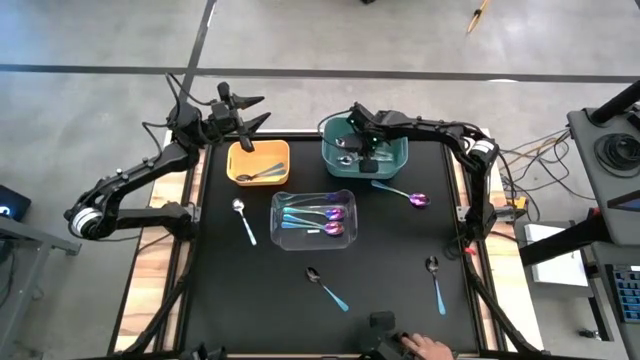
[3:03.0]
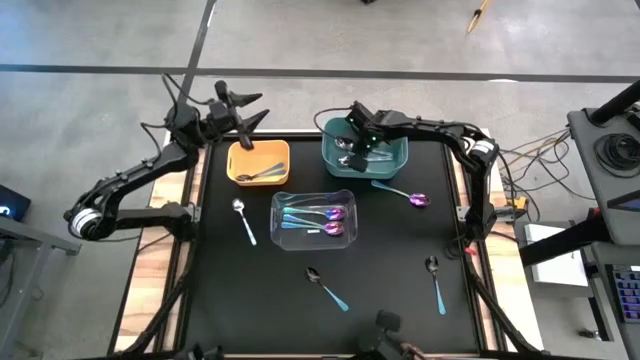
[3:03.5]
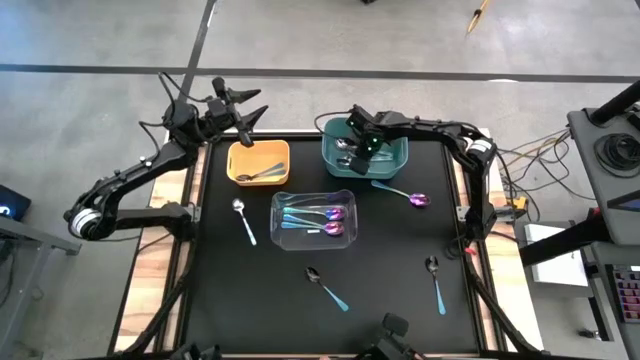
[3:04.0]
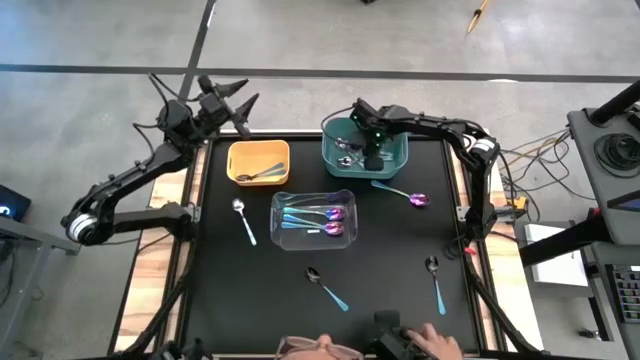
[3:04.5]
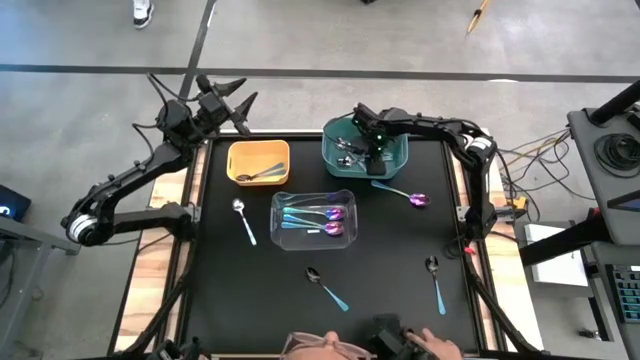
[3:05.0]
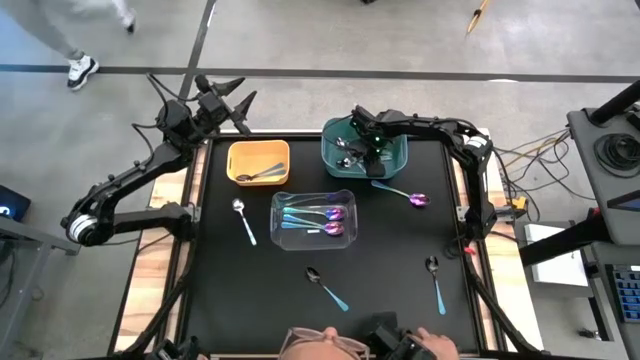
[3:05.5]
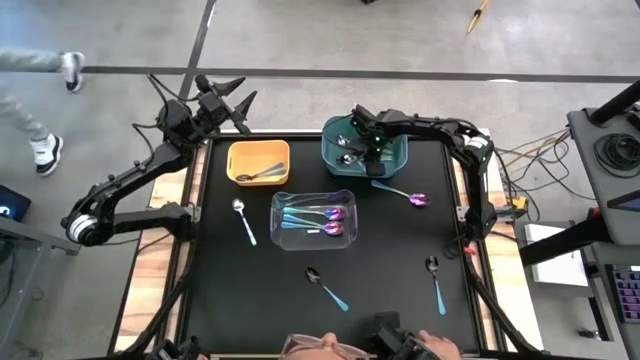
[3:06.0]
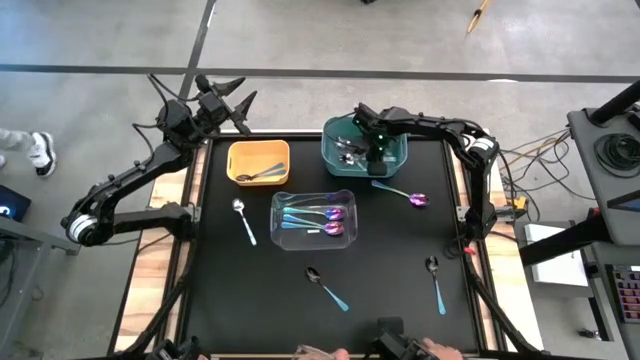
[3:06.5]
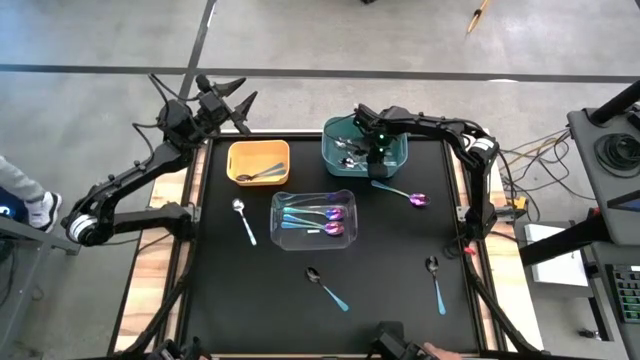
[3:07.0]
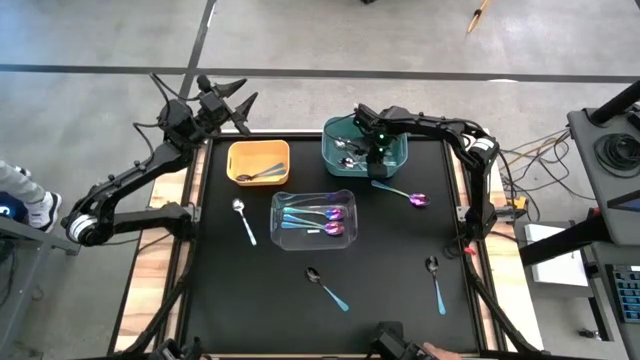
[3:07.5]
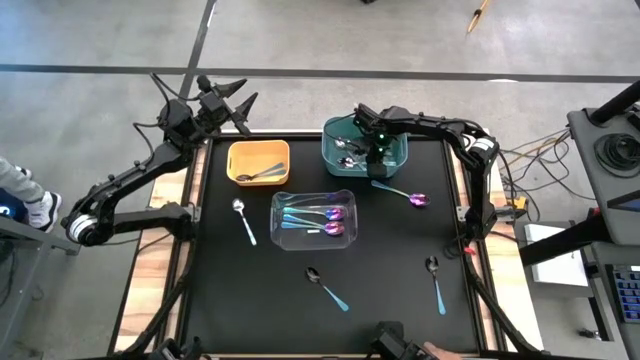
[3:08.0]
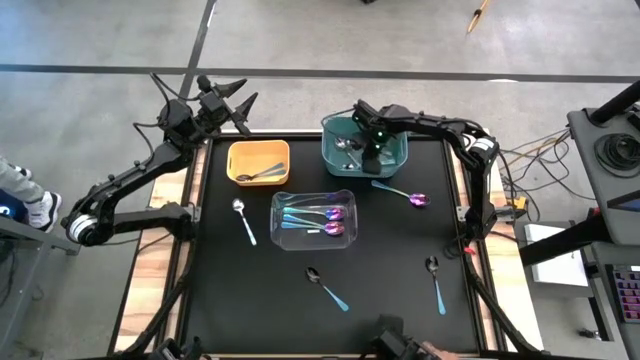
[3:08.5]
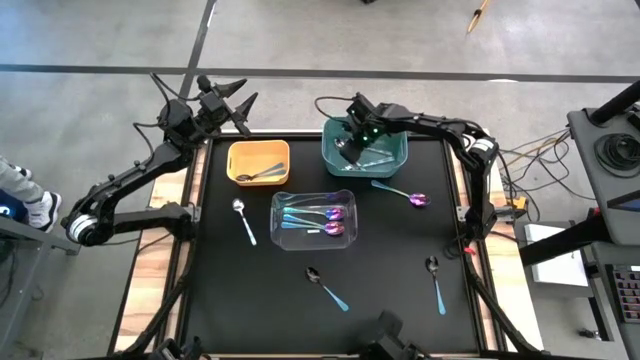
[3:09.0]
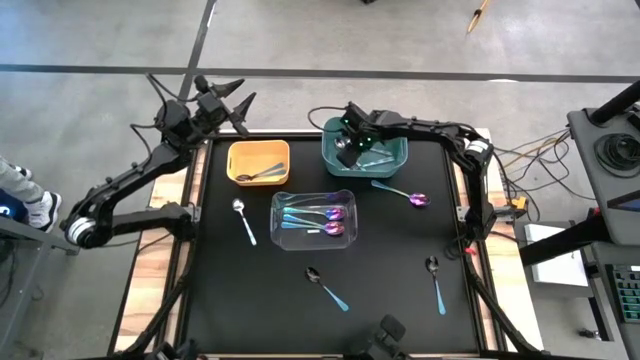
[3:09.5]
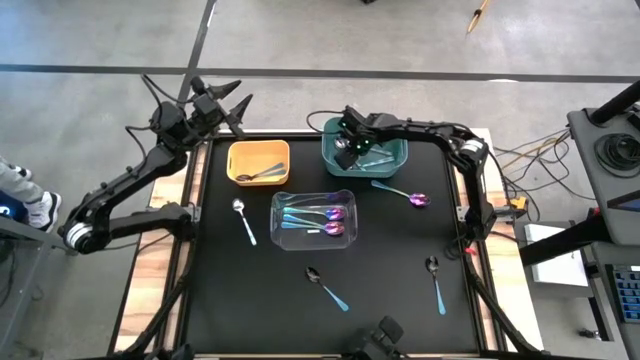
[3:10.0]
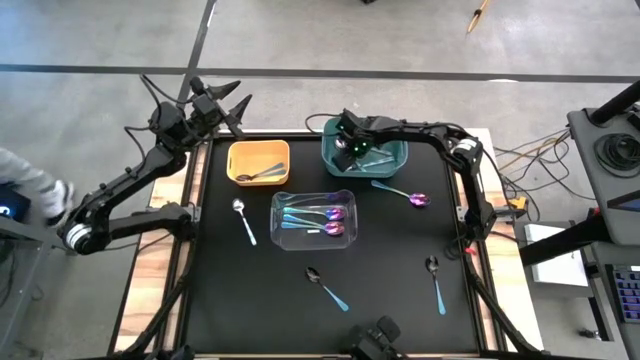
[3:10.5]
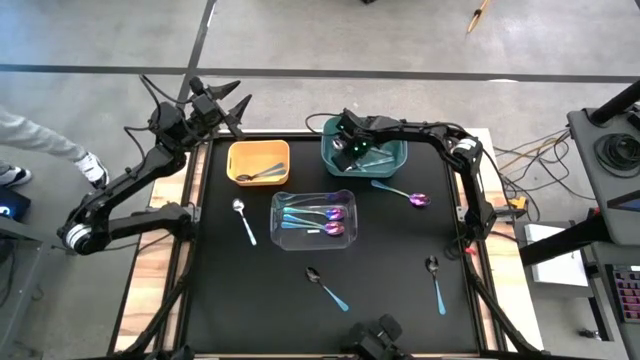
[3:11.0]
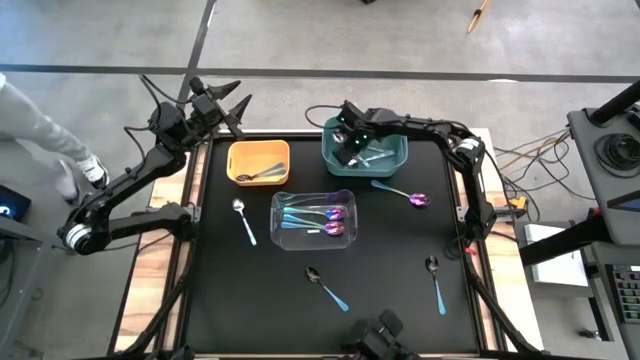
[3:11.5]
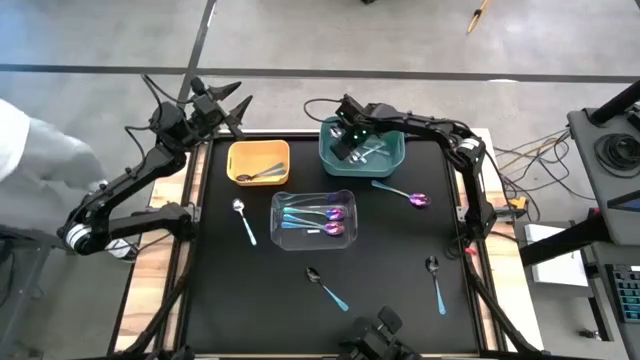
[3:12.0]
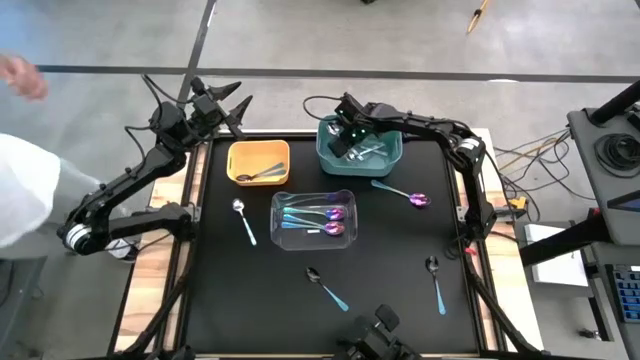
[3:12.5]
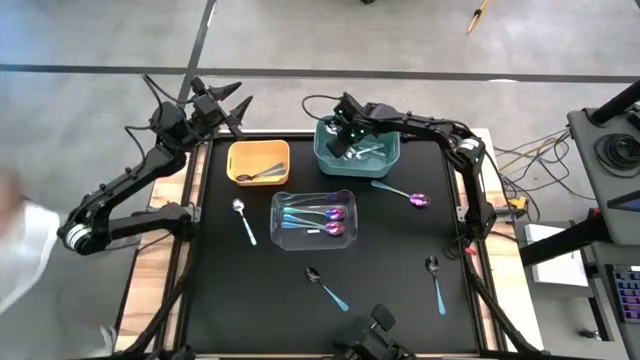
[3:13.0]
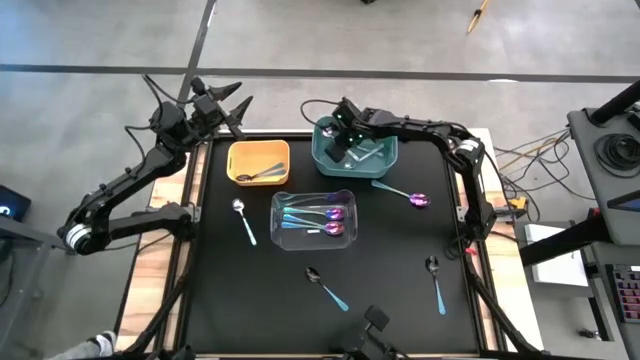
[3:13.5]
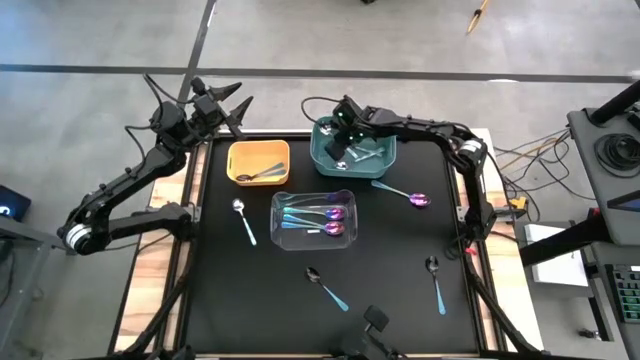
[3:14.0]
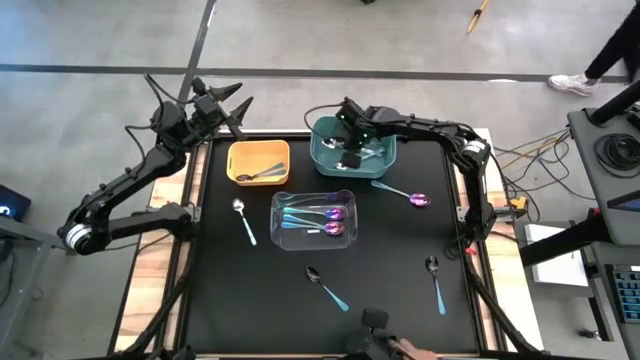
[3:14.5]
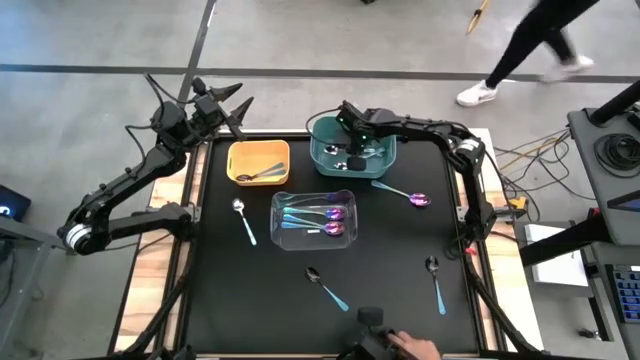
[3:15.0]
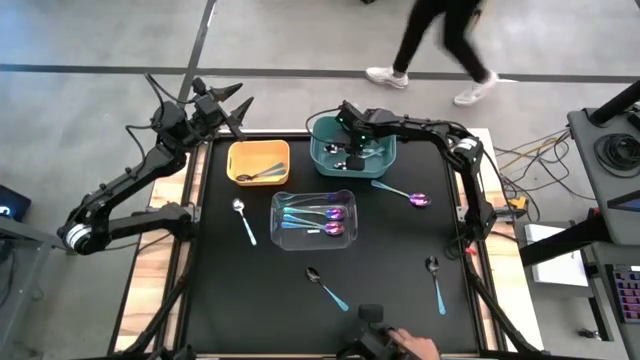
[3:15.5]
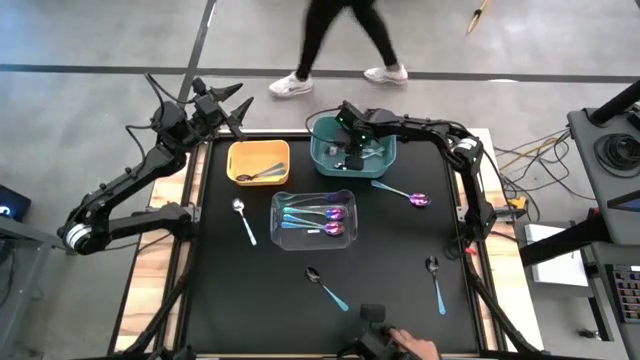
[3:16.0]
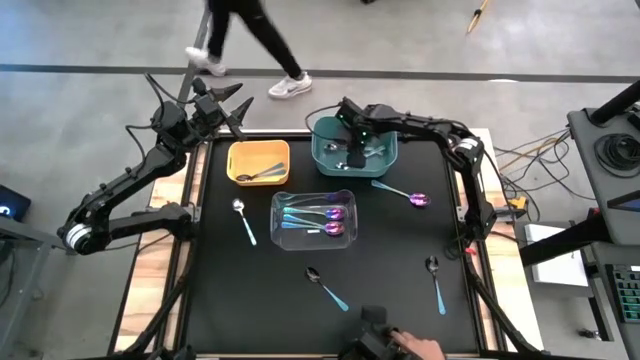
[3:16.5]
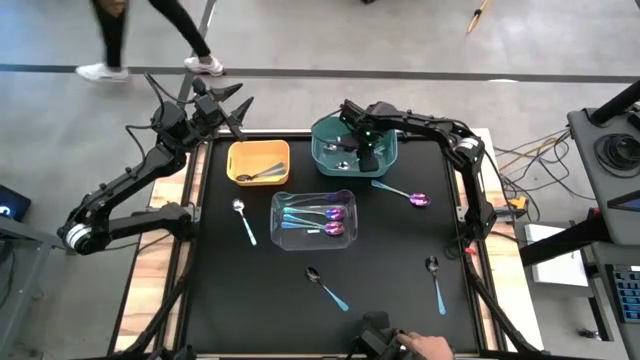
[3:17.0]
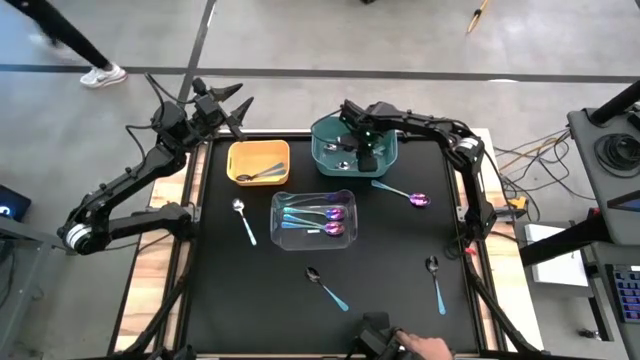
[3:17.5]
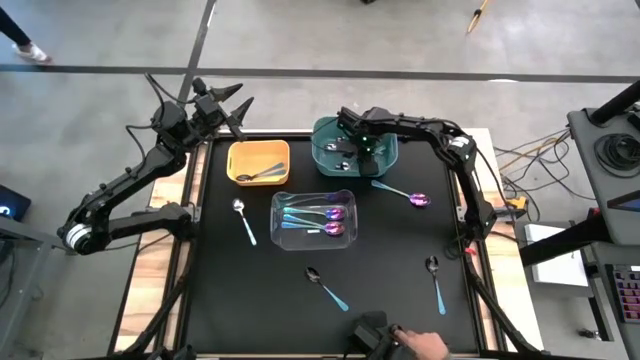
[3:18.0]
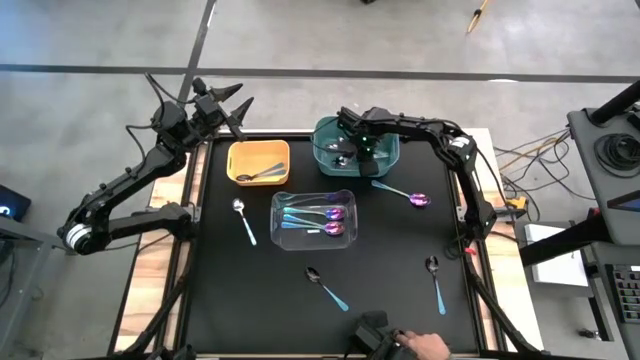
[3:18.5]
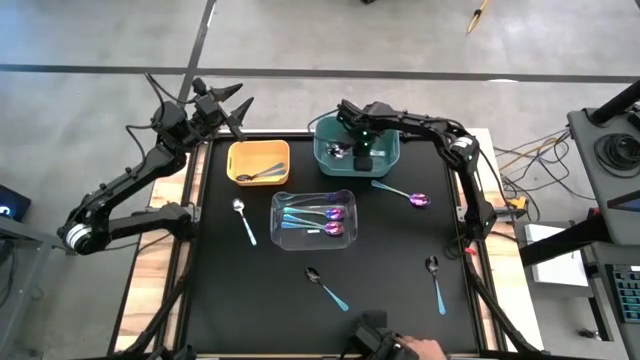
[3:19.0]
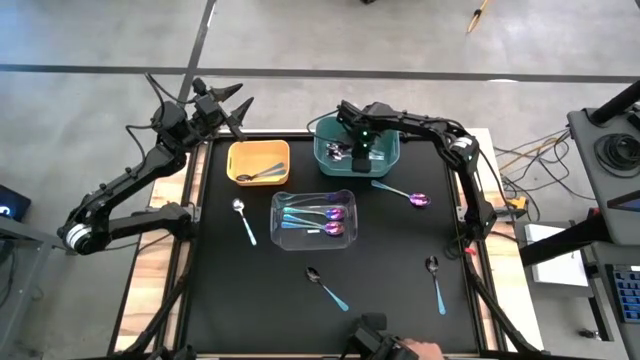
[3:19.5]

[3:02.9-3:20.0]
Task: Sort silverware by color (type)
Adjust the blue patterned spoons in the green bin

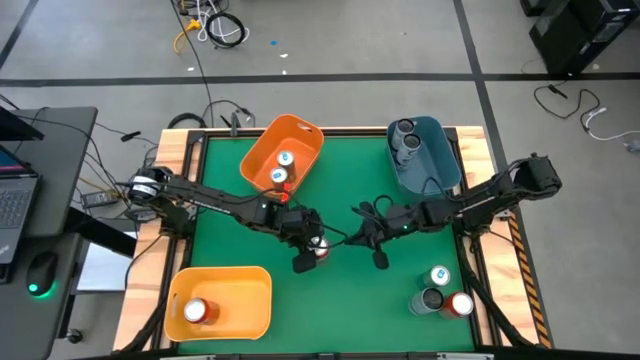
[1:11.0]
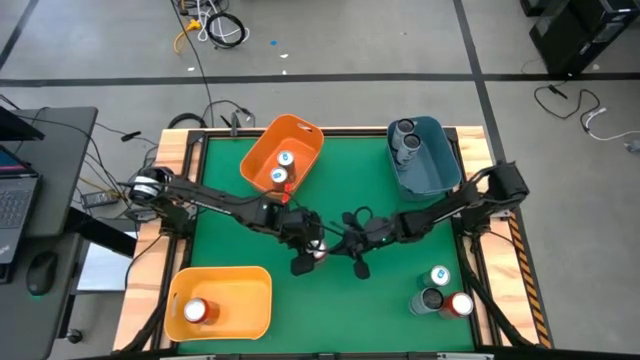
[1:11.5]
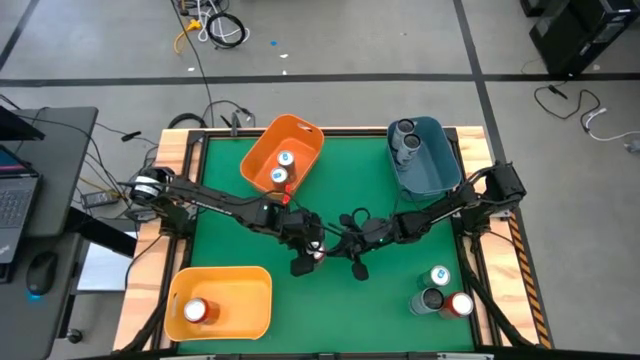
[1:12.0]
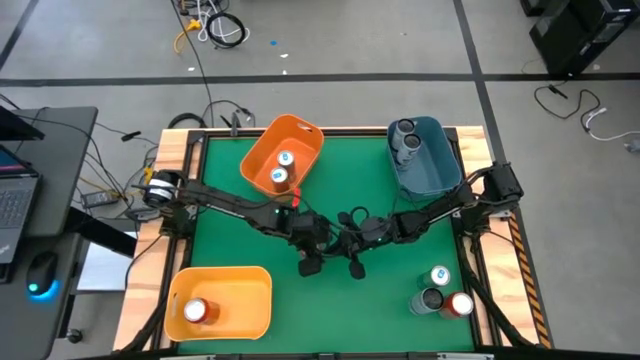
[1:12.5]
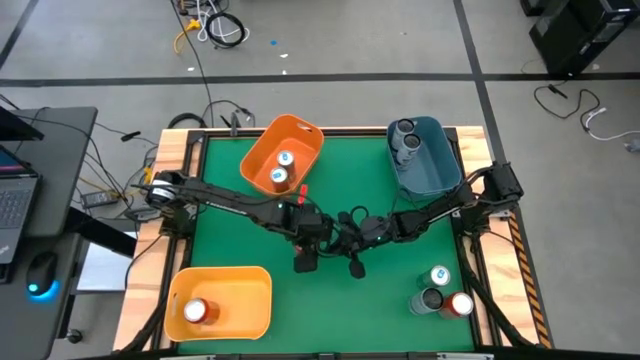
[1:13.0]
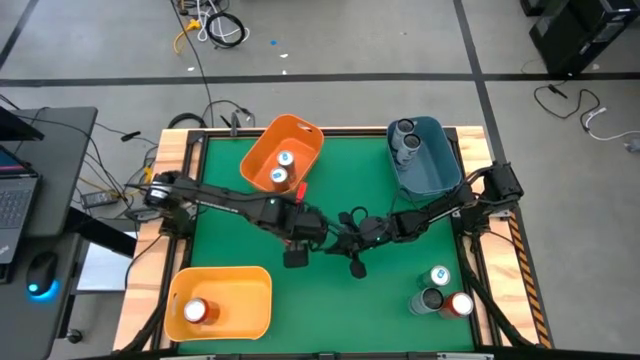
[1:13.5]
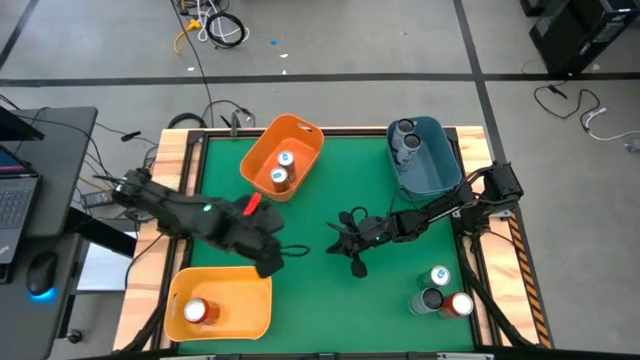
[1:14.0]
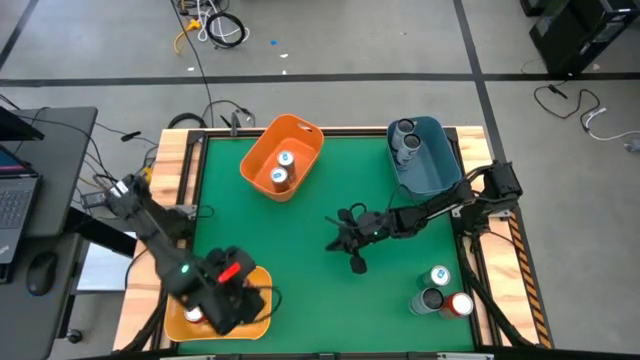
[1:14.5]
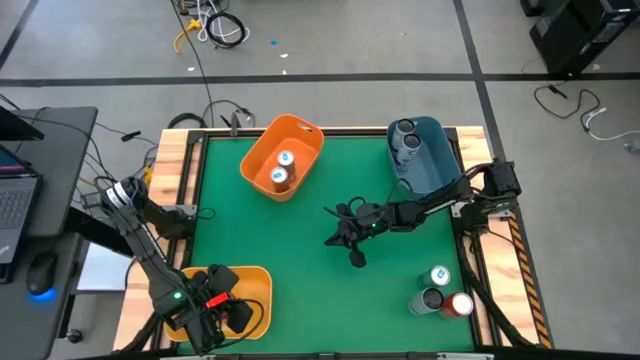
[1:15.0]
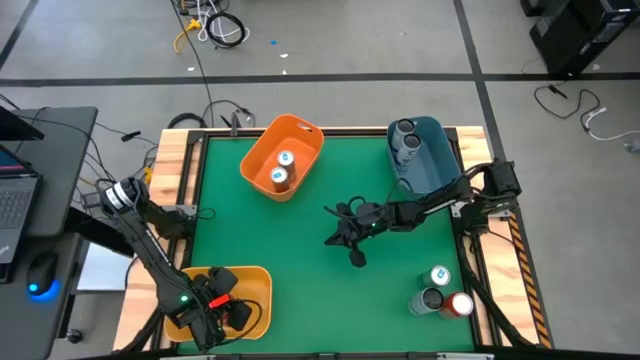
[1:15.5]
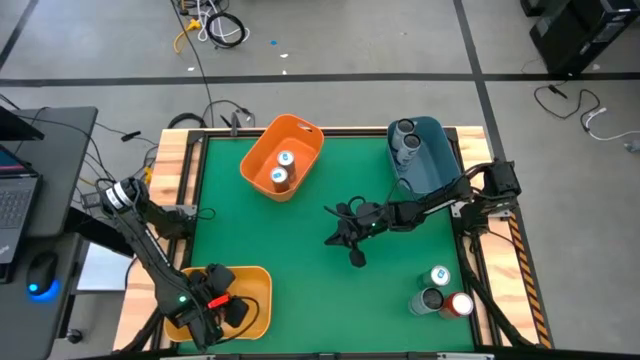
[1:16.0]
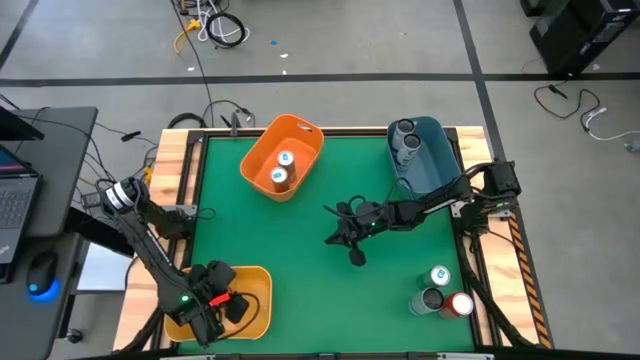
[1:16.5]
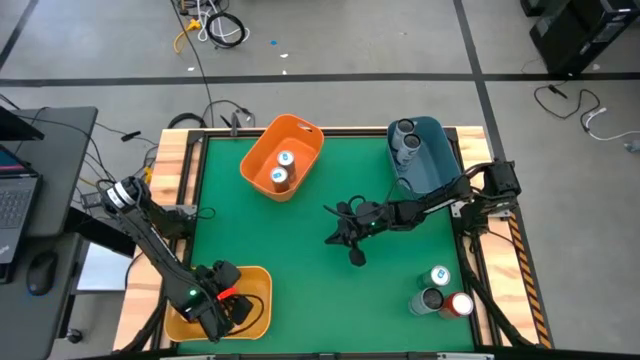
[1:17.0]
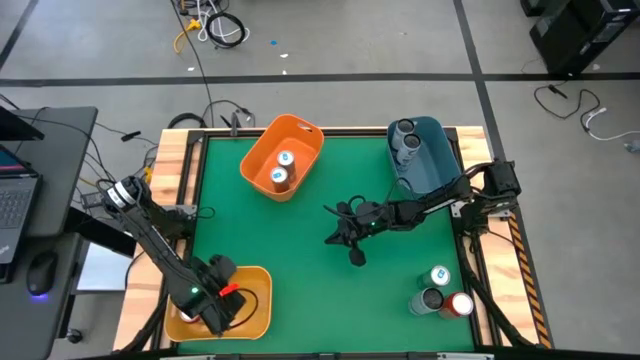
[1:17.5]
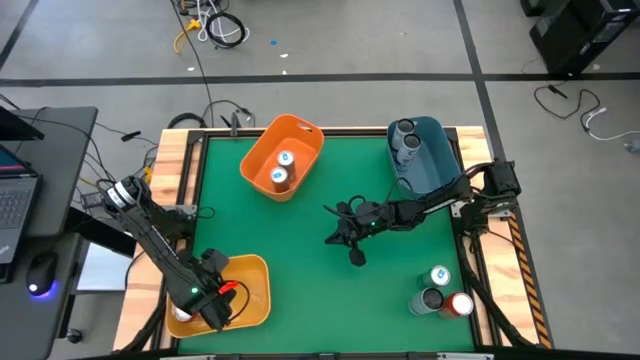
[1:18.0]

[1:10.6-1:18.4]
Task: Sort soda cans
Put the left orange soda can into the yellow bin
